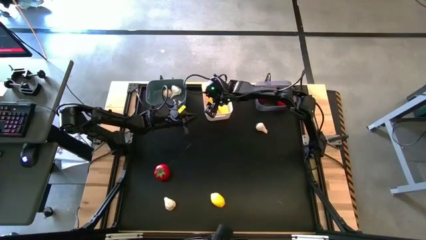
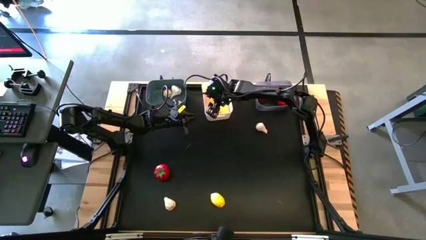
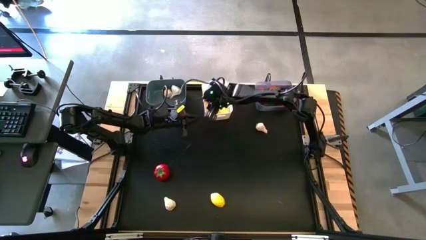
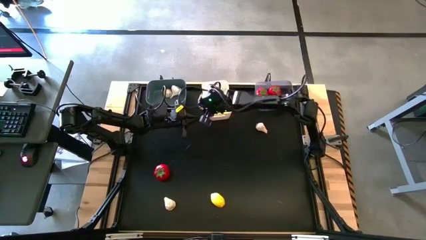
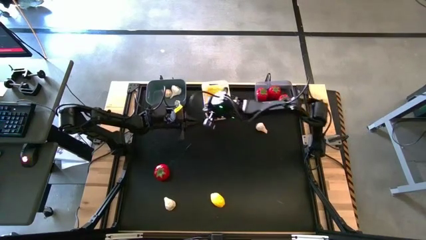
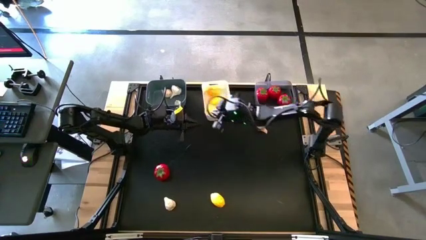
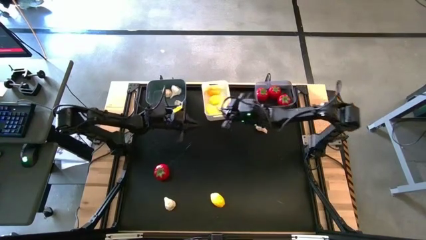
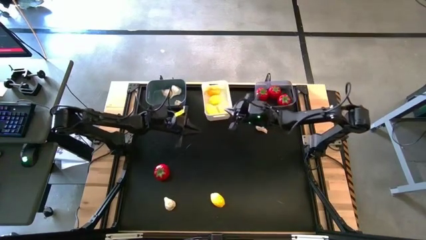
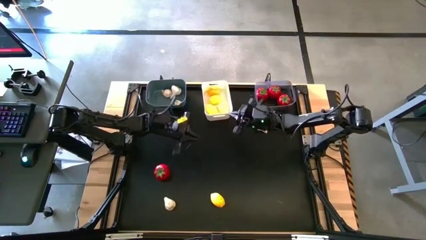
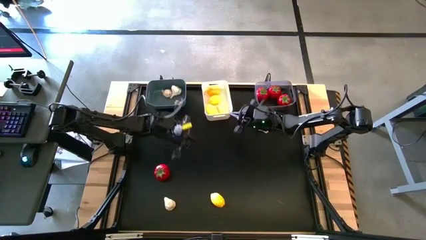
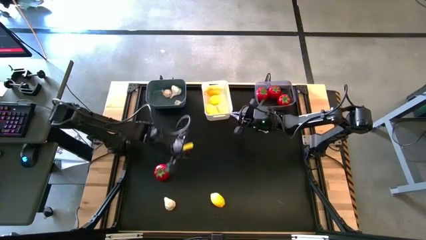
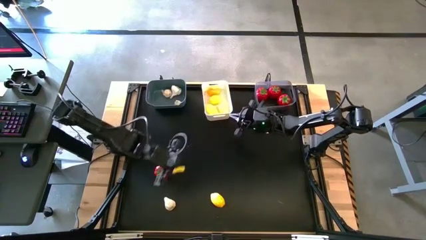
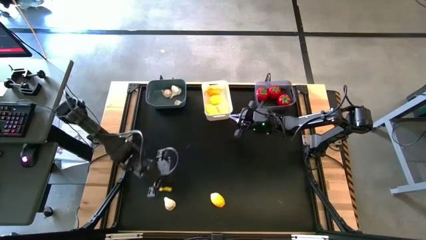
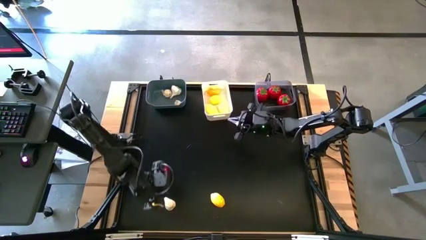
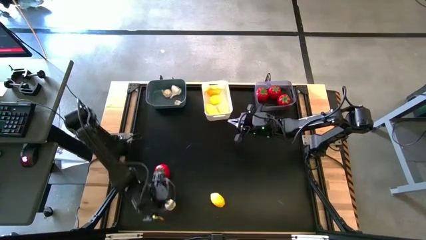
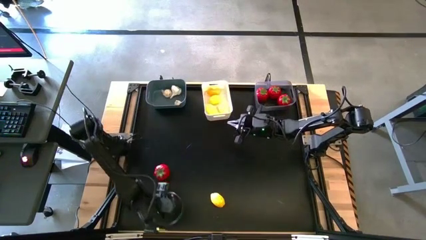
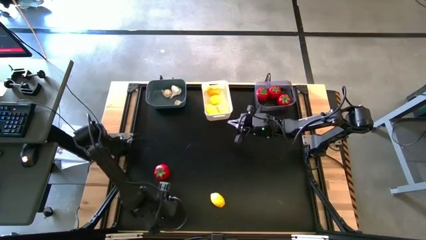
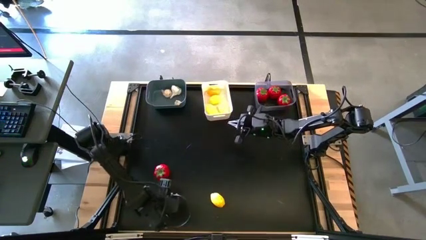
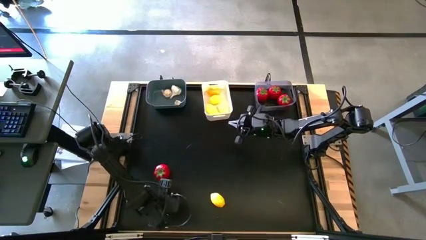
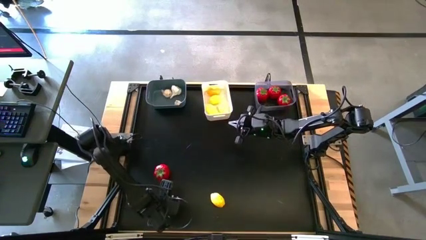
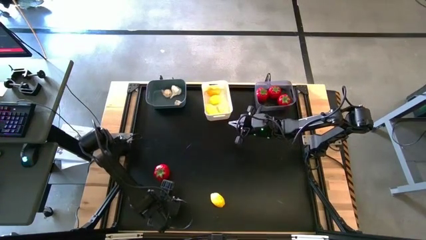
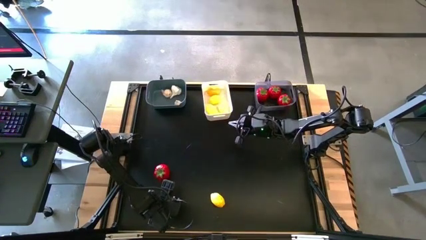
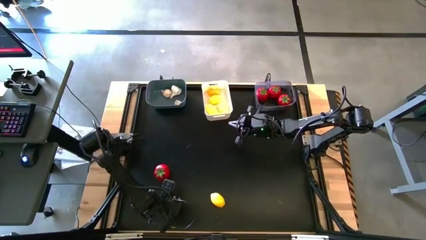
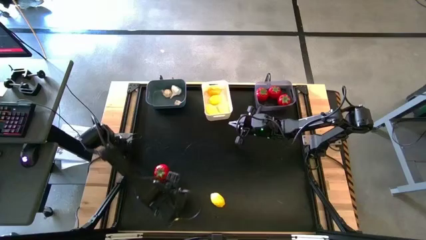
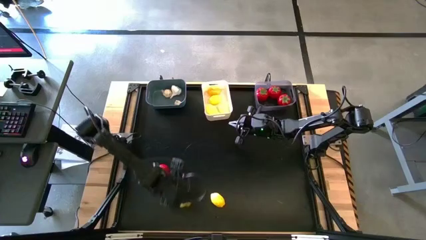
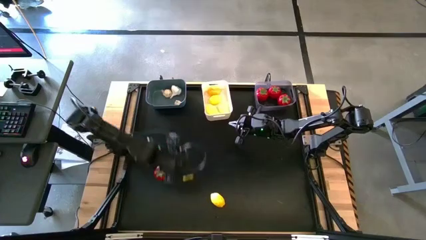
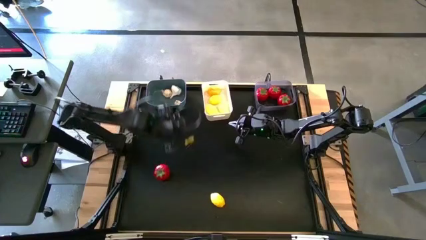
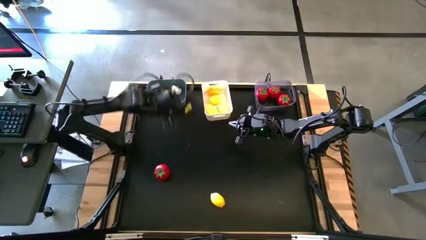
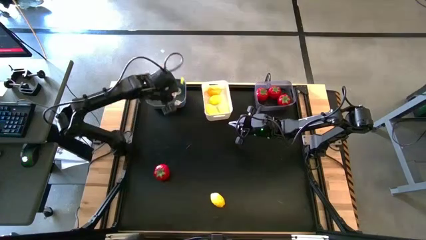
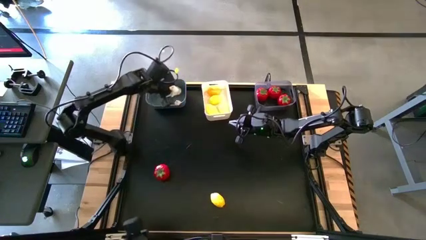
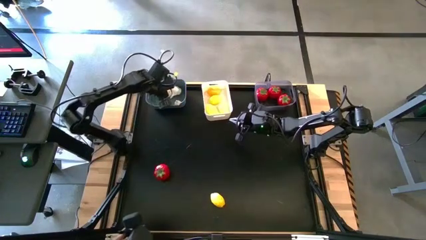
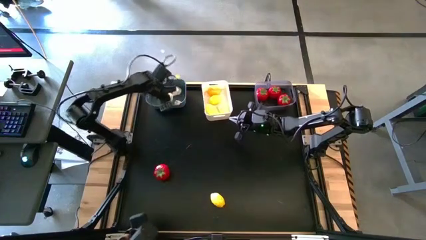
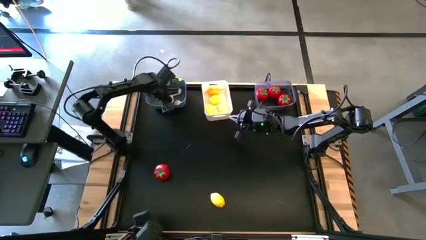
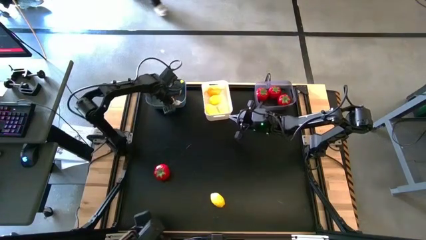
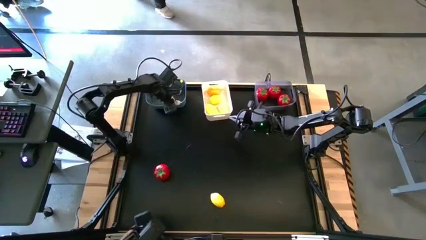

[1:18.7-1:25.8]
Task: Sort produce into baskets
Put the white garlic into the blue bin

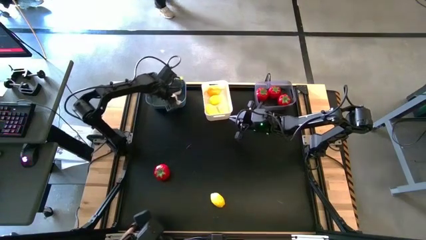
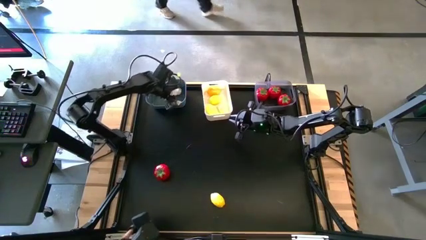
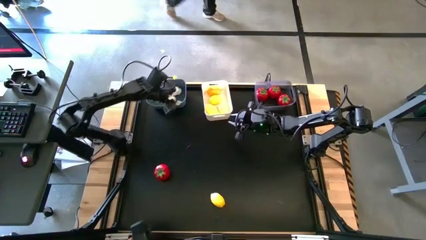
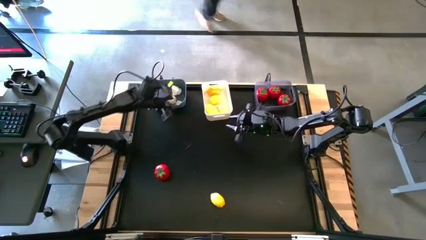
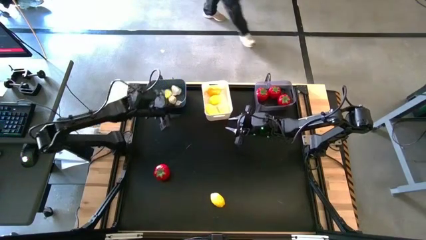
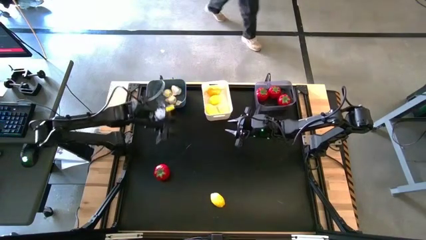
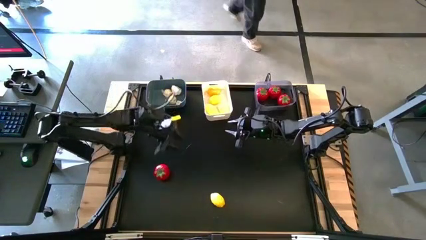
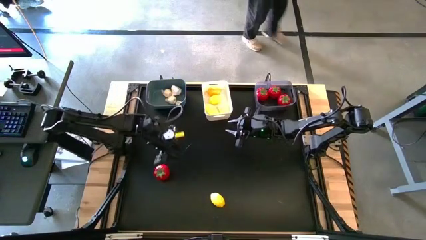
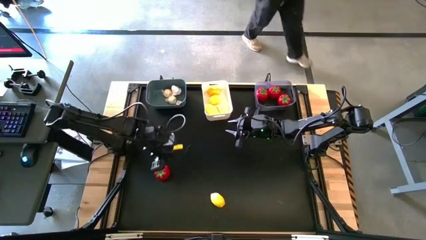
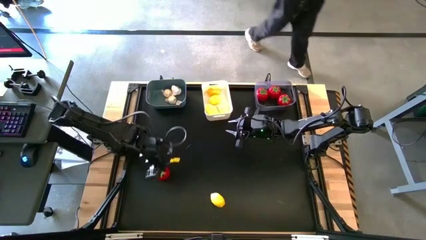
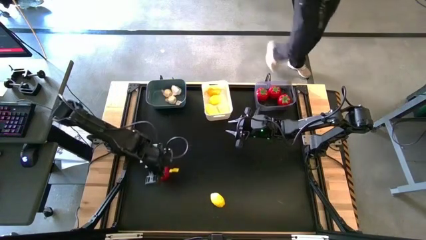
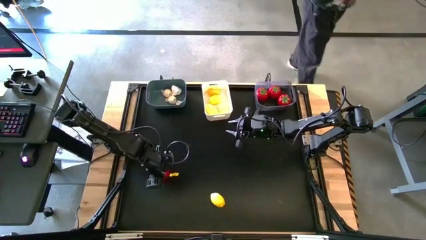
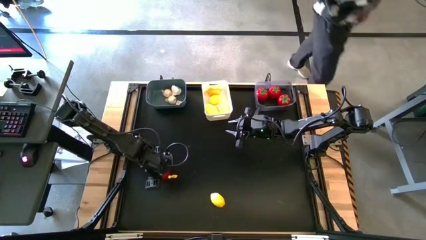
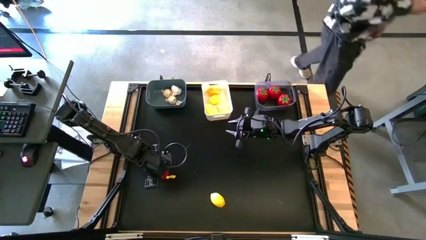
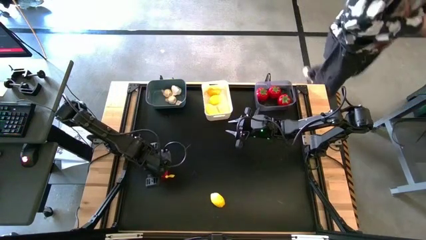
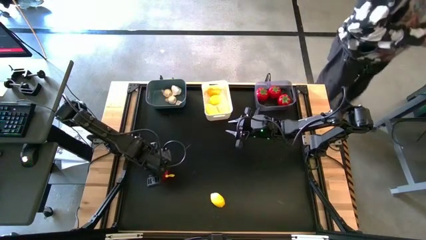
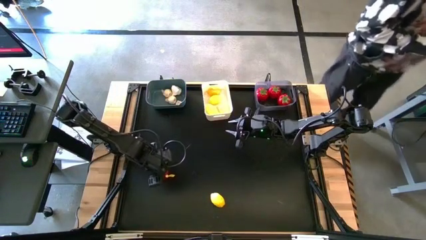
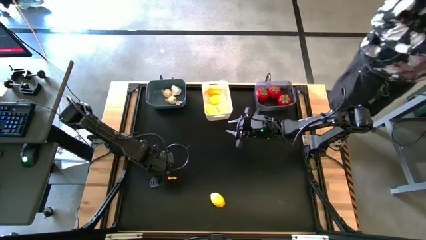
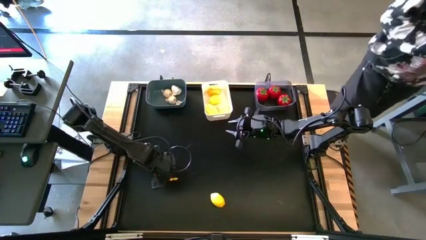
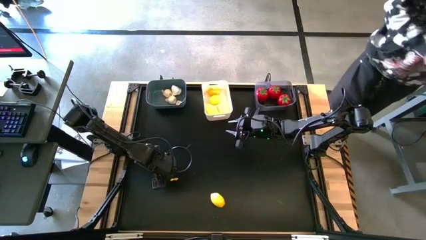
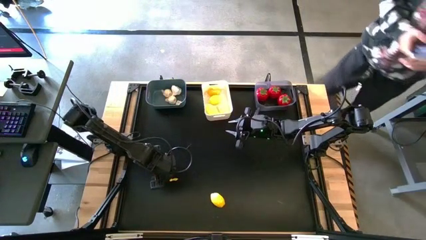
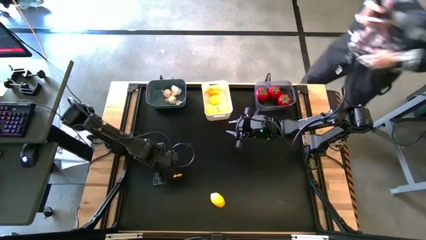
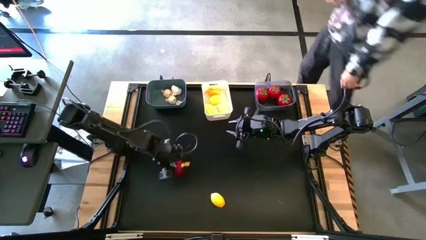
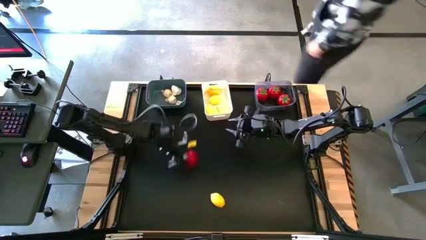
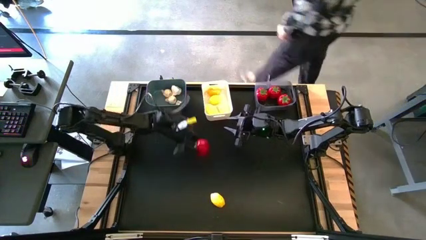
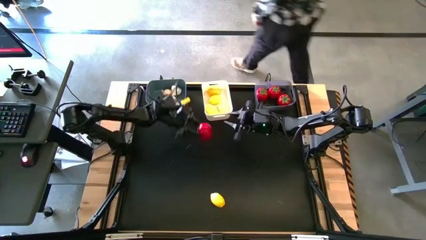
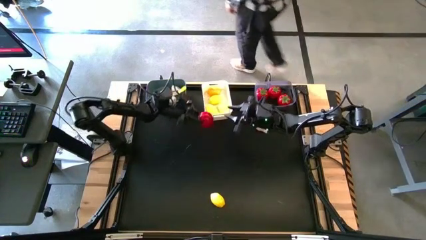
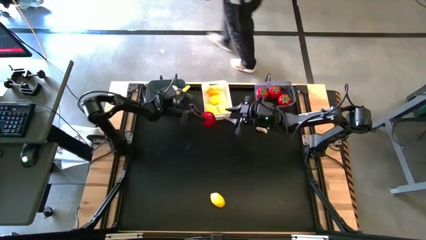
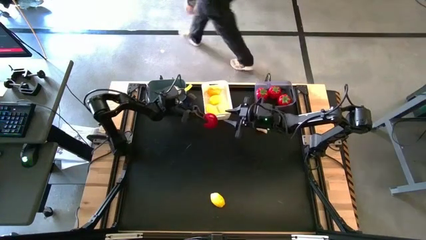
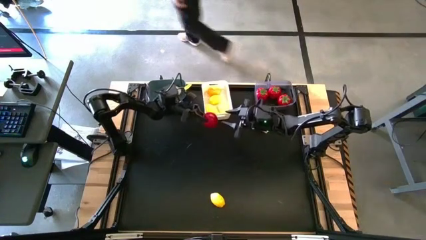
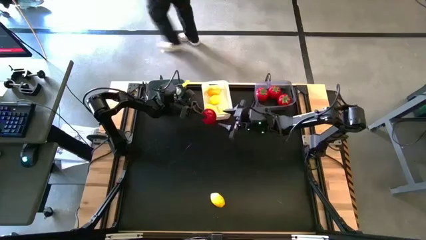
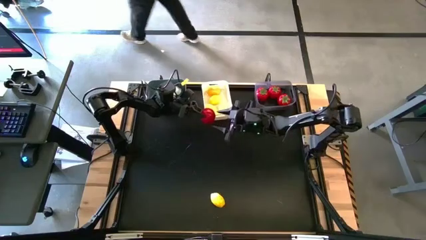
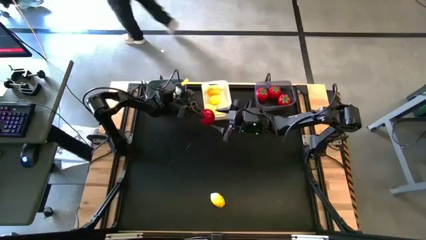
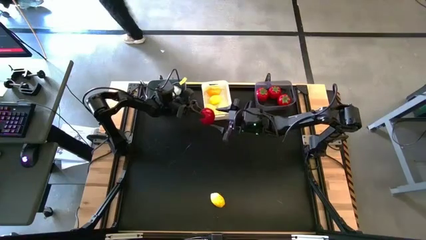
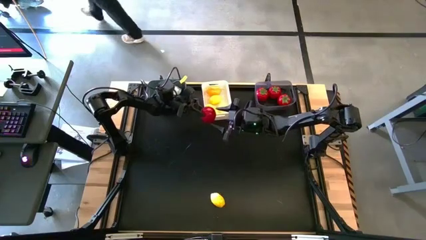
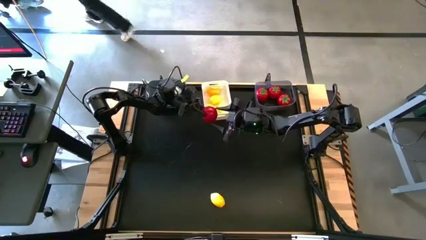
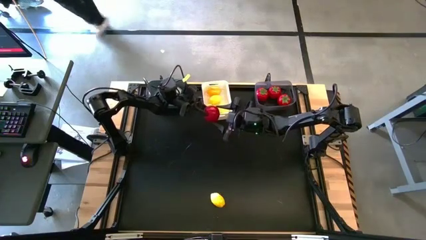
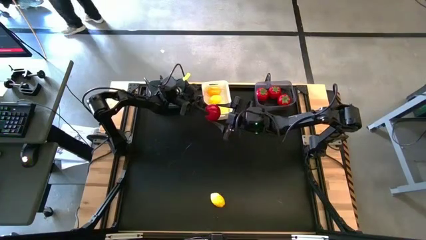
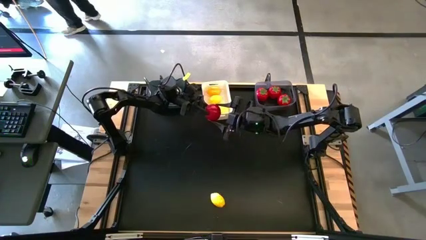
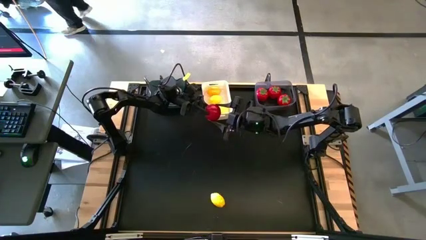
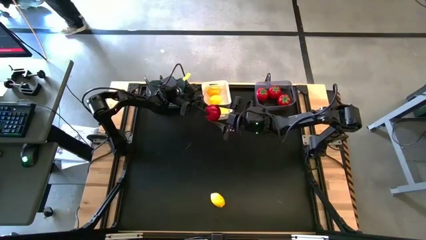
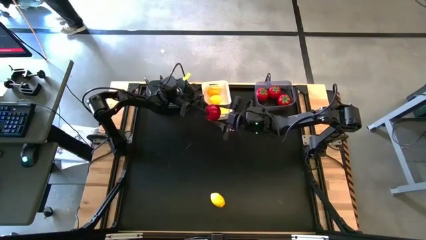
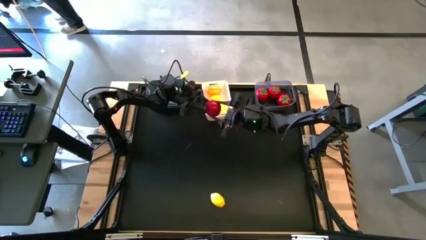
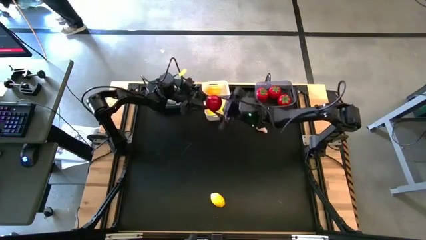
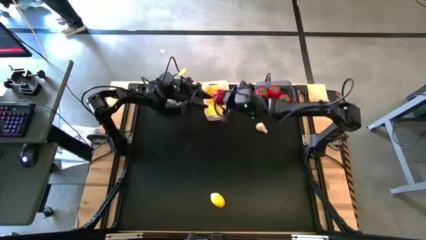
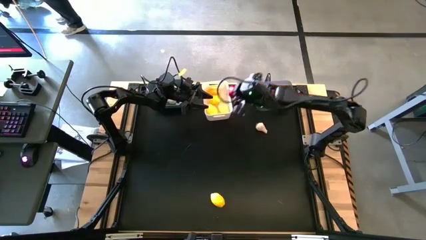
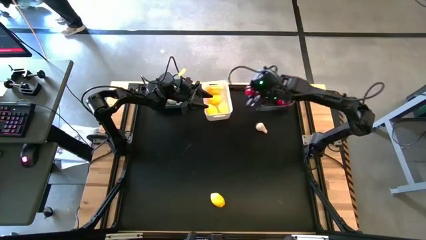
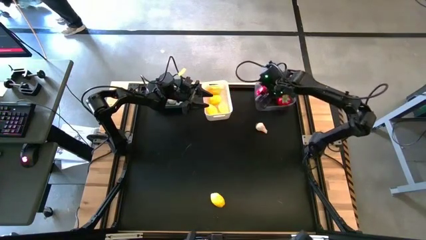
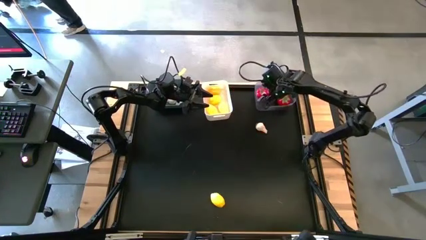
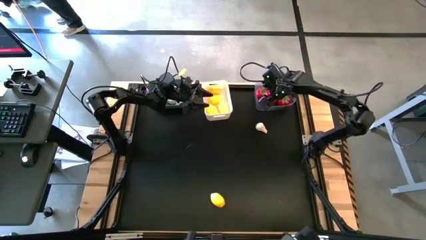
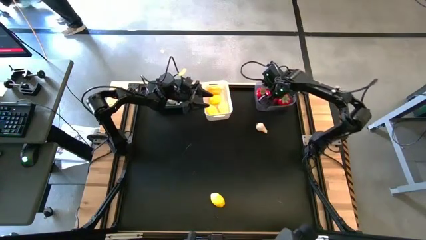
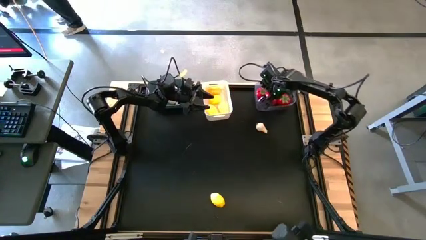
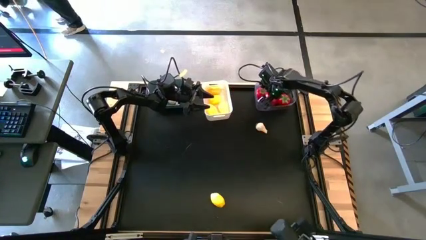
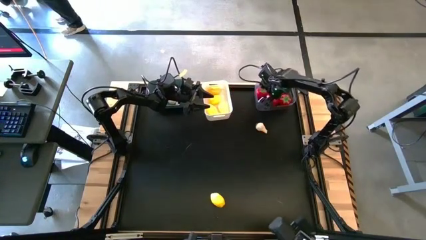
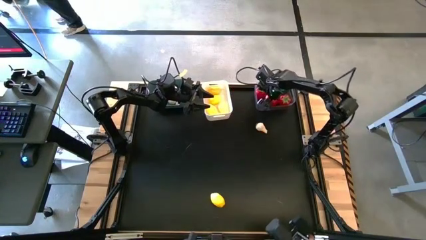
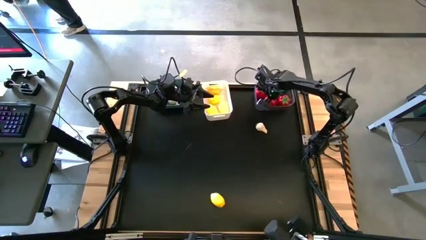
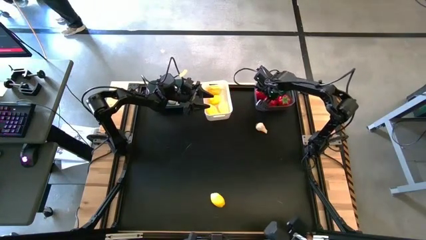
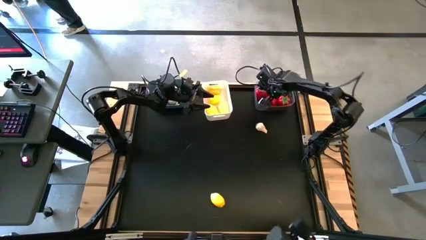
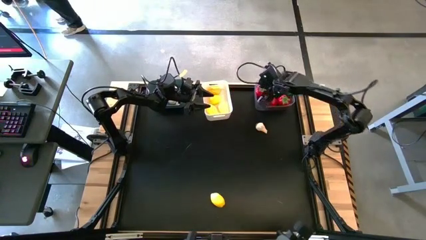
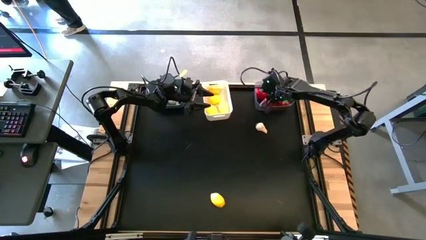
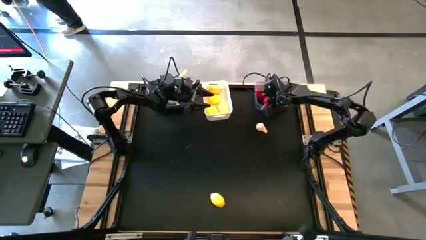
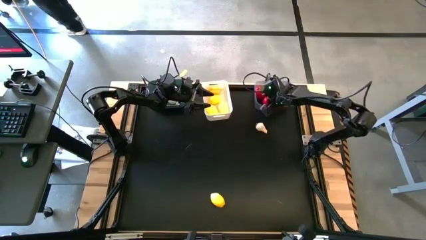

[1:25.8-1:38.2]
Put the red tomato into the transparent bin
